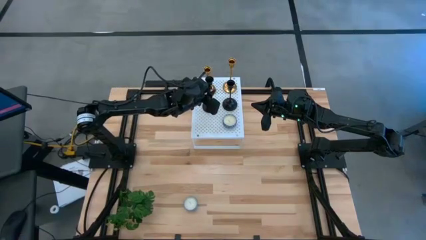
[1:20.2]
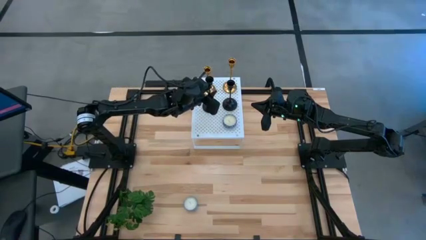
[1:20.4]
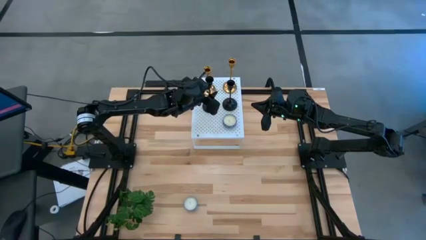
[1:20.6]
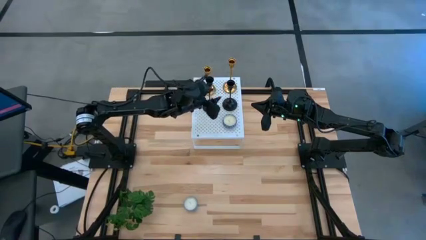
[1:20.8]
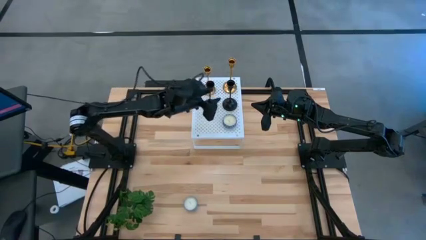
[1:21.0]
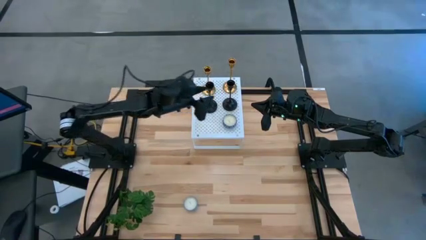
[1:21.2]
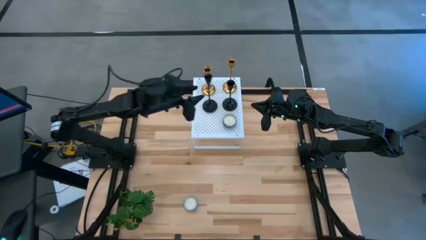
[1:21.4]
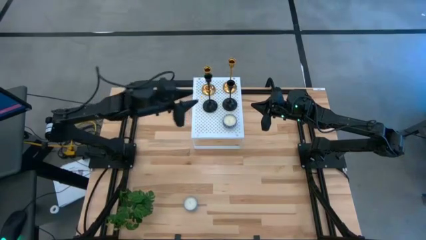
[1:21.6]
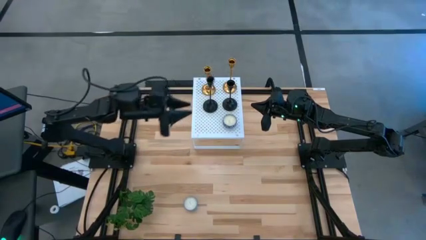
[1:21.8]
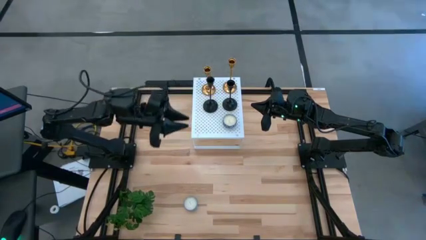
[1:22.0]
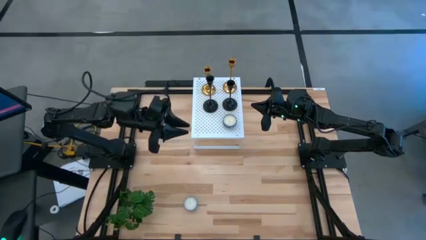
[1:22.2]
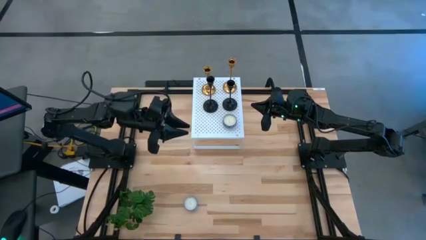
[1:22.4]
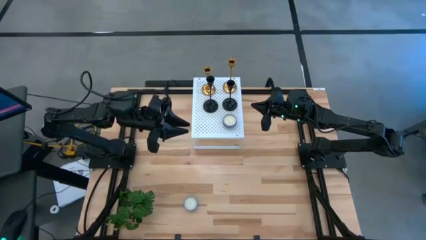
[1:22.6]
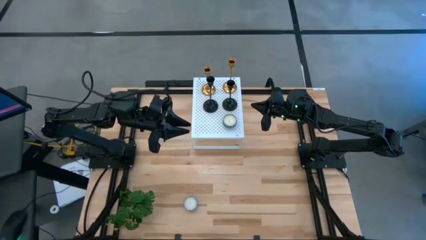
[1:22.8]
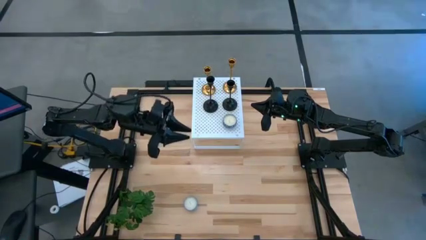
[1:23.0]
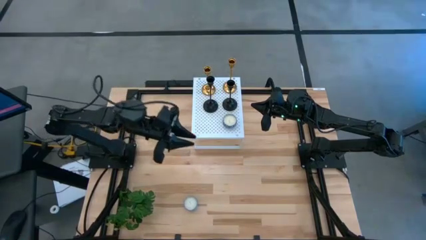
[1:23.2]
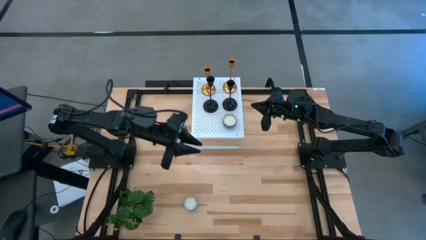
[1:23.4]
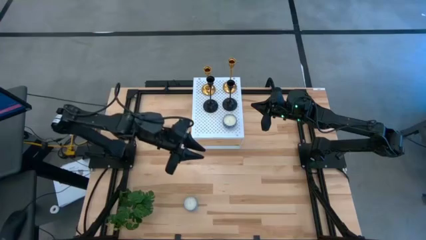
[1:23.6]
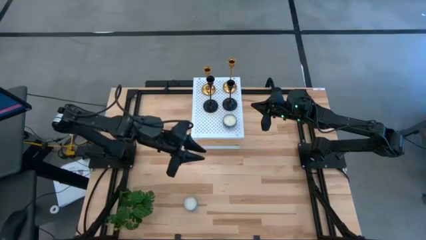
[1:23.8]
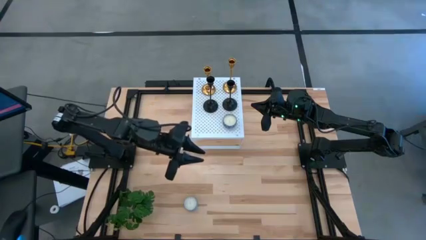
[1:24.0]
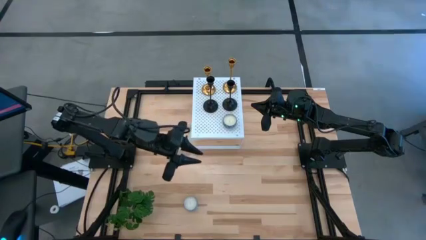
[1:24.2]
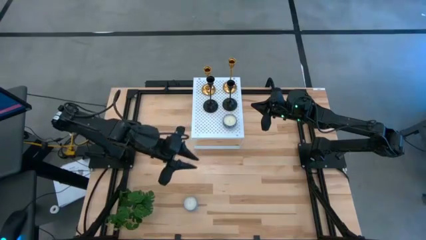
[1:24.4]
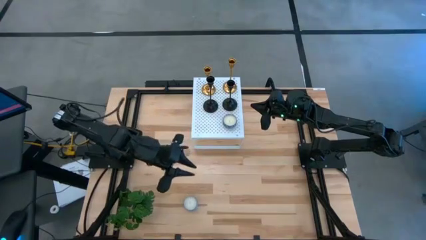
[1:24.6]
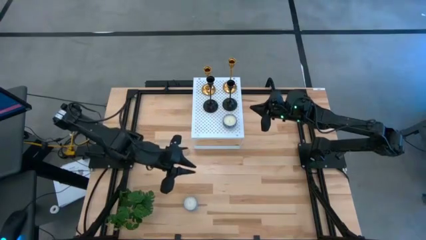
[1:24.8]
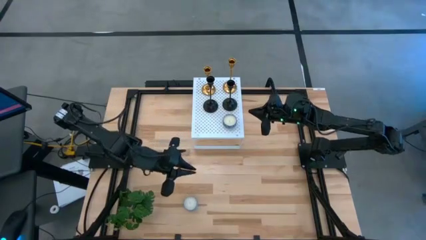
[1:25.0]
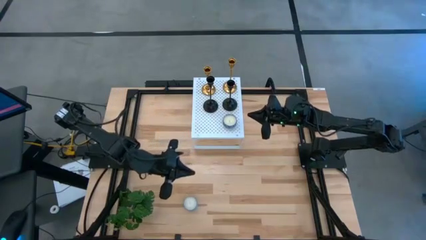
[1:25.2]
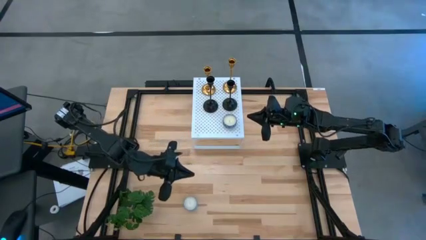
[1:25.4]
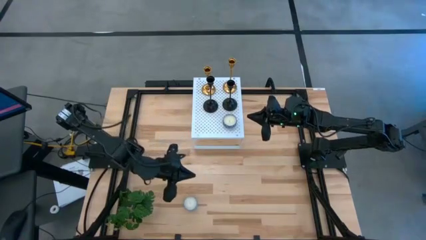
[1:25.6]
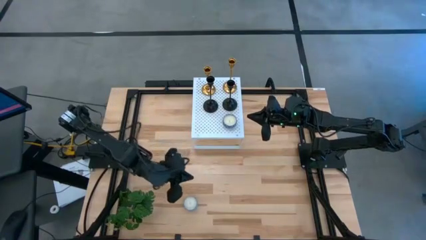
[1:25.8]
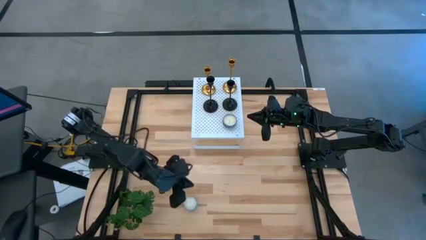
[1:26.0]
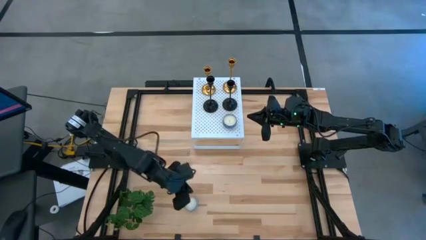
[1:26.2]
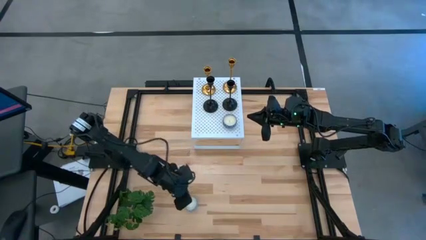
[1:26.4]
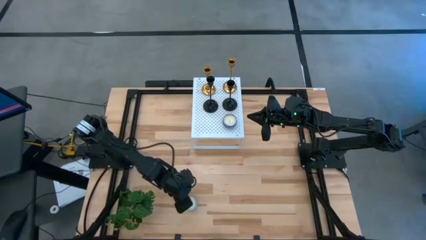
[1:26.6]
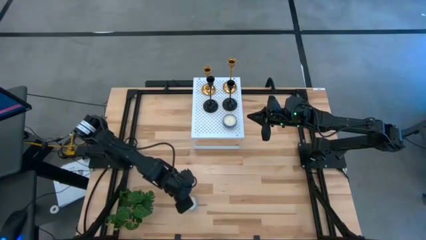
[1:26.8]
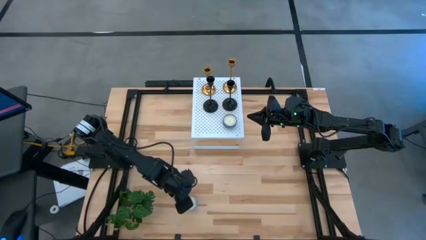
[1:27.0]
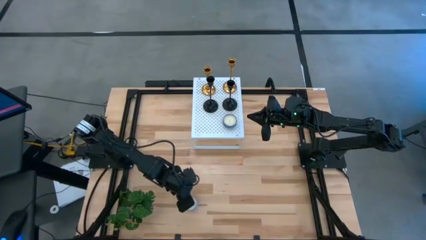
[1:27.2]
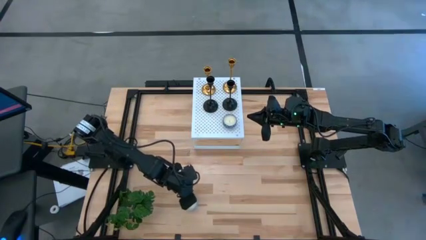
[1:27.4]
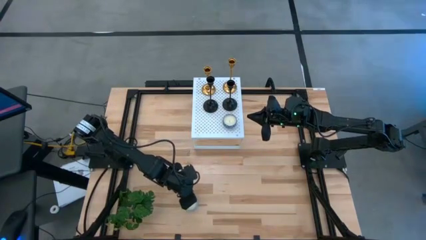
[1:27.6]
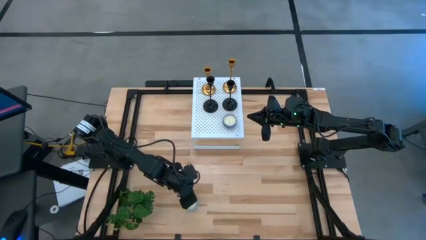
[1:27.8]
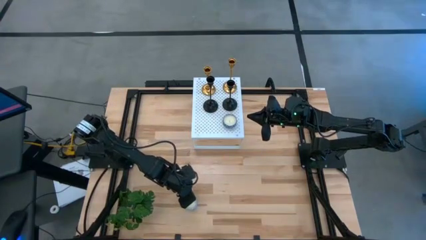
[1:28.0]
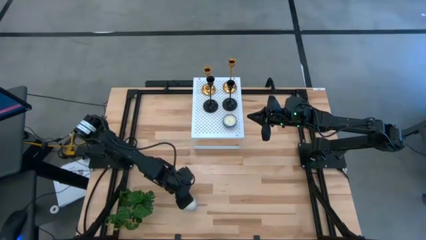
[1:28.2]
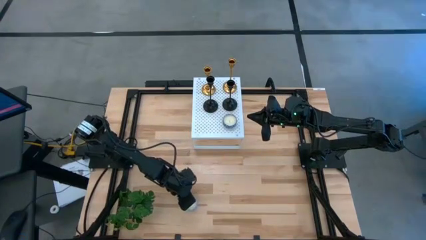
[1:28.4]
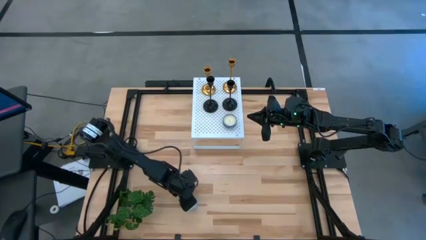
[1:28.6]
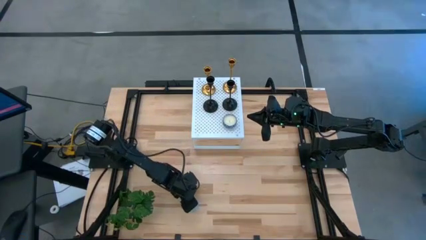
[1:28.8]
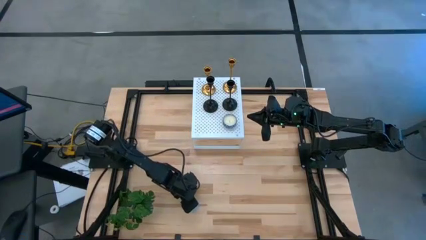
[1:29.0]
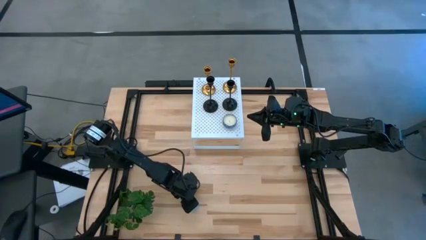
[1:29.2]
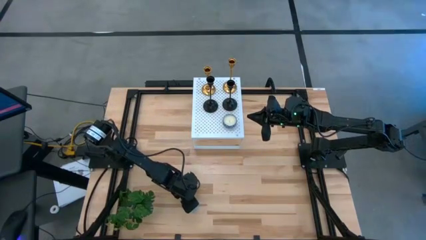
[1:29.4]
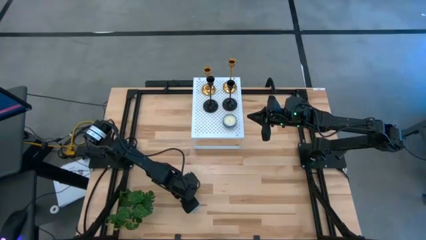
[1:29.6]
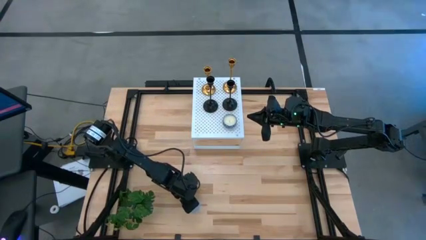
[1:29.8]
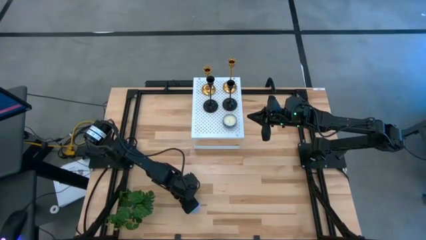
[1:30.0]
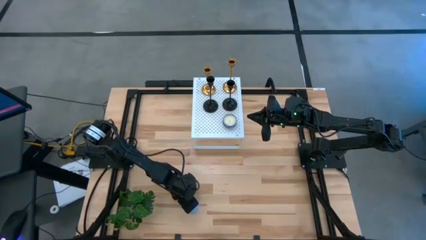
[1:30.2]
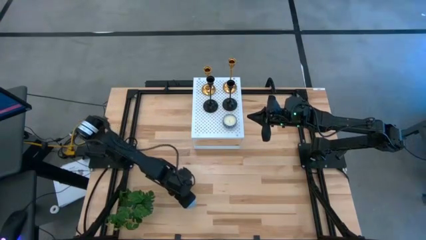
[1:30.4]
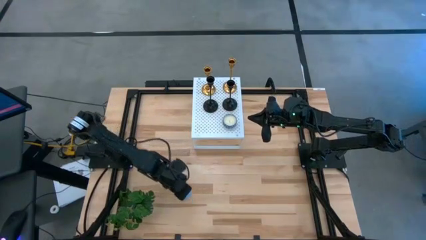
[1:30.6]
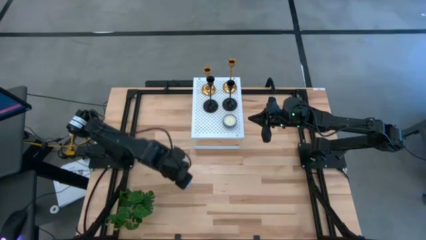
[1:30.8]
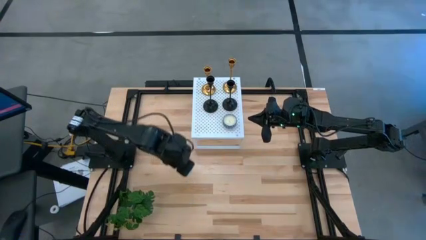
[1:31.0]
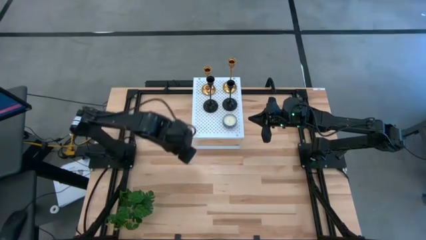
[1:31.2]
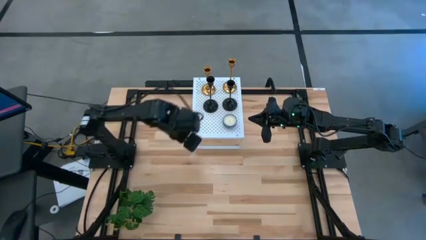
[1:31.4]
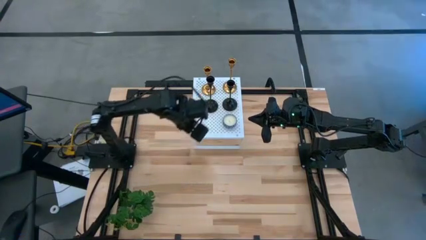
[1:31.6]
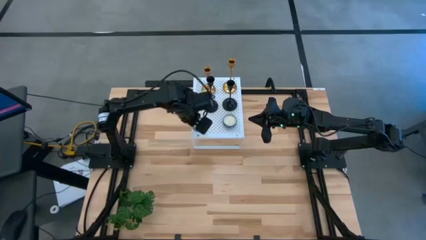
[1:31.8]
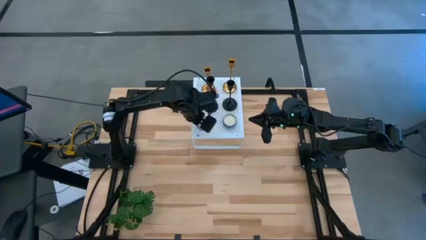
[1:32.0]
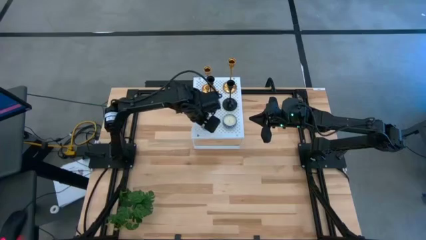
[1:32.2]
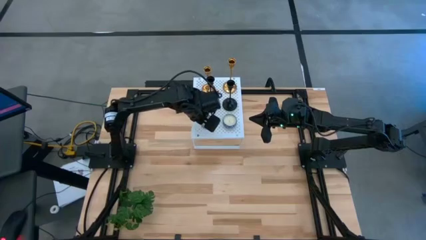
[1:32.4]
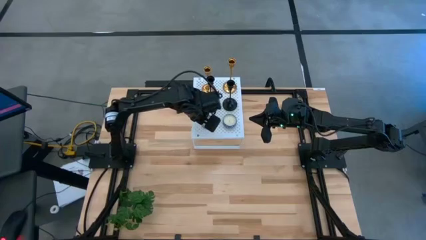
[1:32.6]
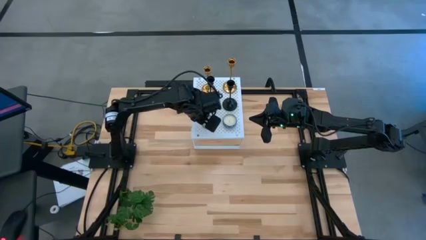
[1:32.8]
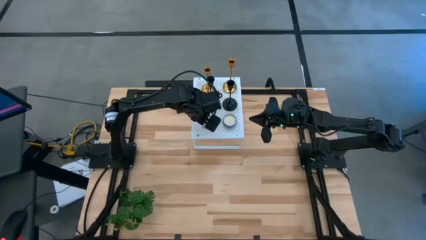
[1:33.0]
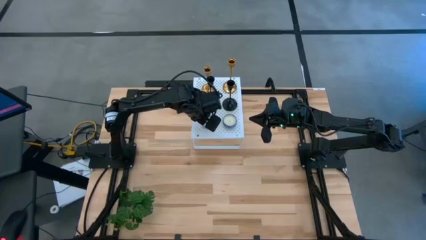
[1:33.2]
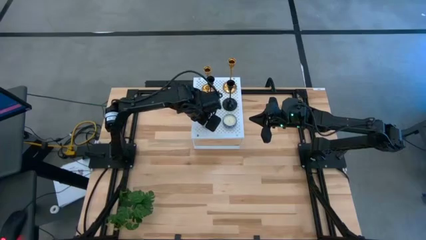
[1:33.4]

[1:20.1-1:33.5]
Task: Pick & Place candle stick holders
Put the blue patterned candle on the shelf aligned with the dark blue patterned candle

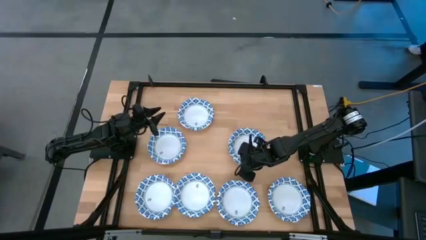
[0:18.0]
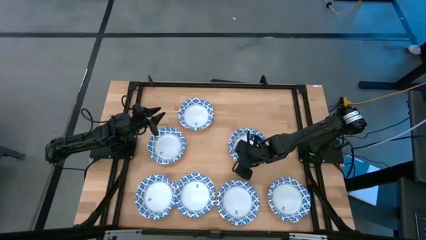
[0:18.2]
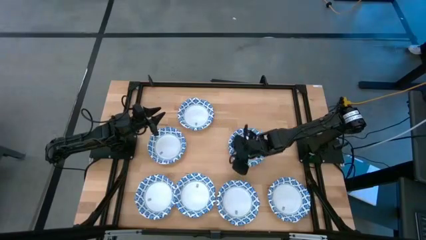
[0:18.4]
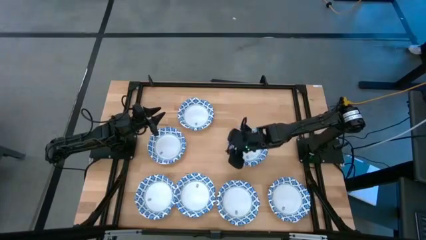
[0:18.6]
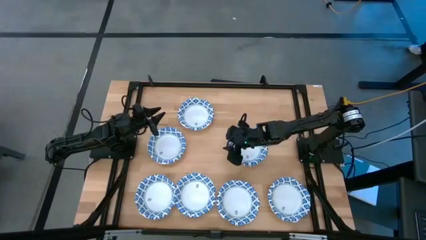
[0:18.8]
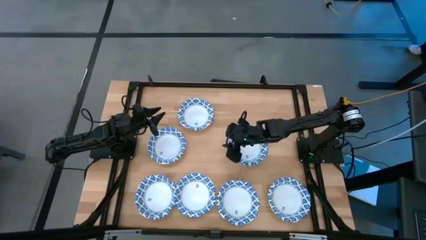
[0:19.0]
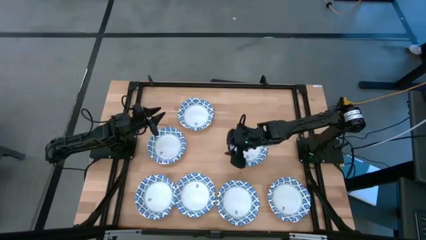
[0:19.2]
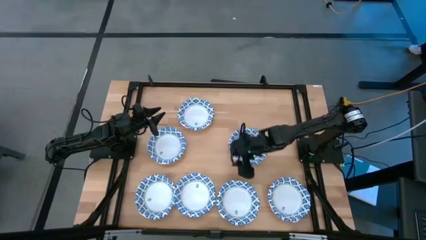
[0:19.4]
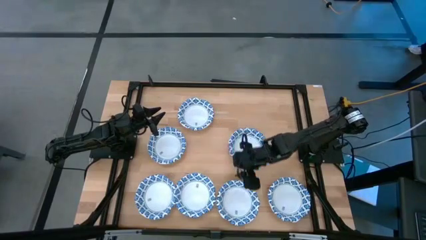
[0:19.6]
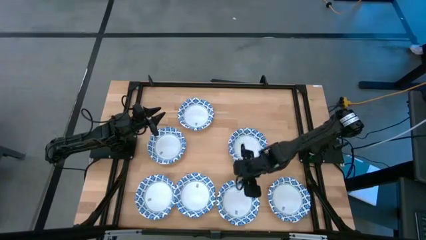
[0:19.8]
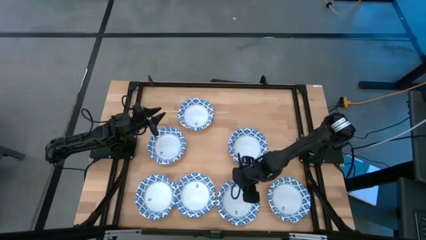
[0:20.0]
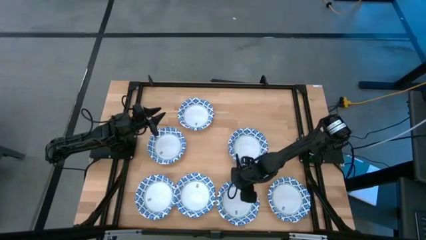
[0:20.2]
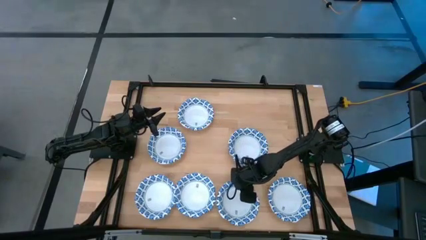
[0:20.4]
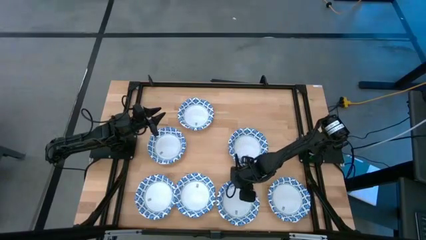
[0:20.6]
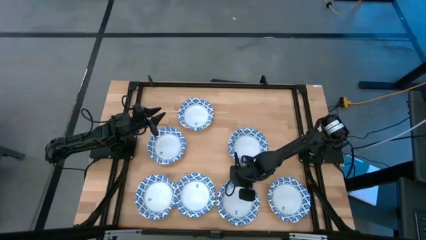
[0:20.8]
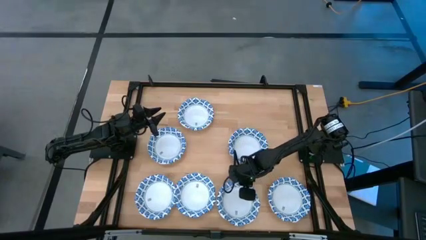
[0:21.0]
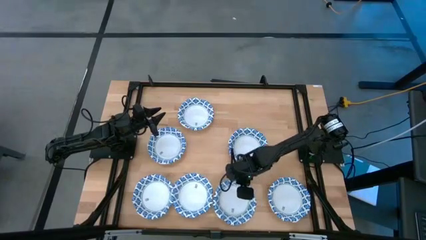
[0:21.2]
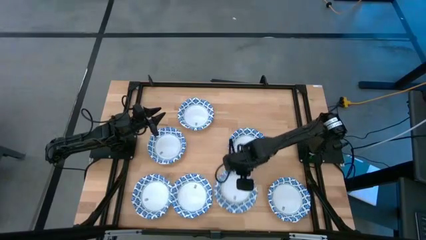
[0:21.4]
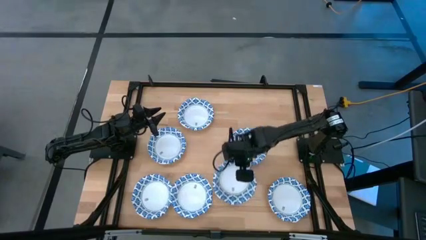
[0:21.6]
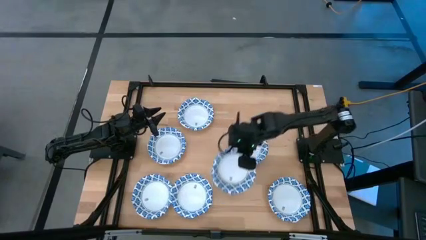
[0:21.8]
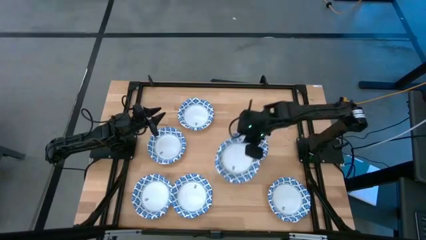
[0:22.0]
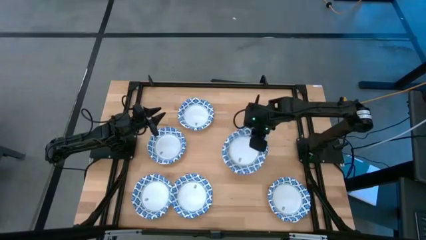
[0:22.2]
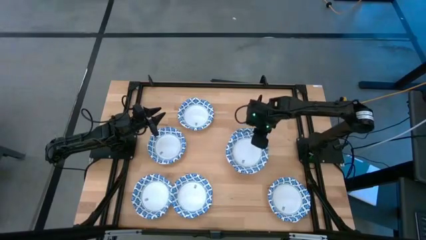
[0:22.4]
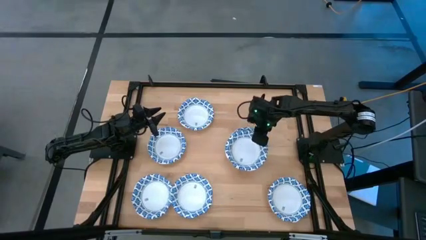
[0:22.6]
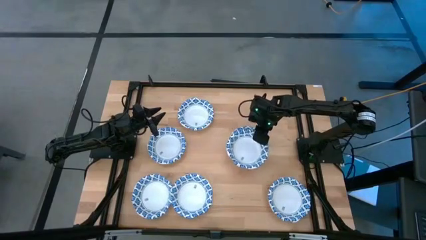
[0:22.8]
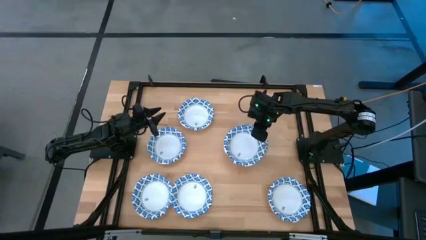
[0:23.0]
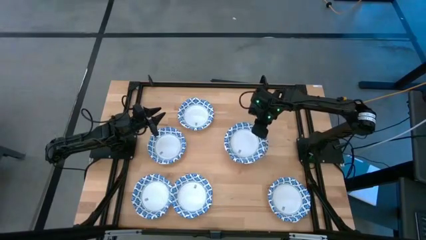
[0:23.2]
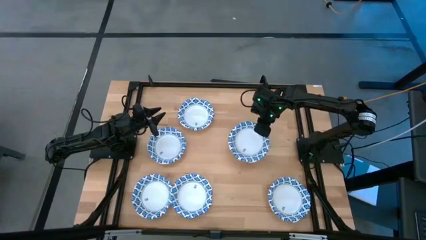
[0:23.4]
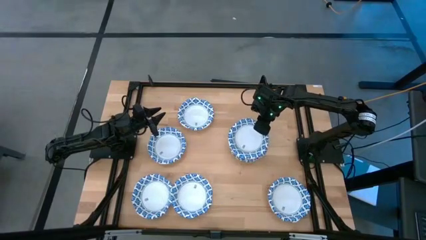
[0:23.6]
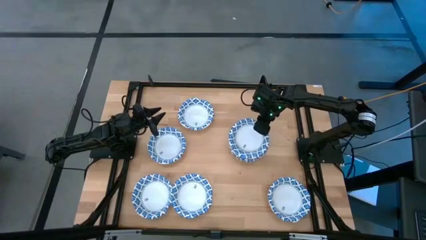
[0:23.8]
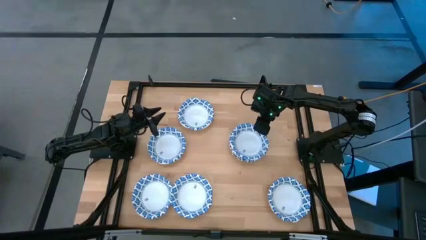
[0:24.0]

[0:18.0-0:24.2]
Task: Nest bowls inside each other
Stack the white bowl on top of the white bowl
